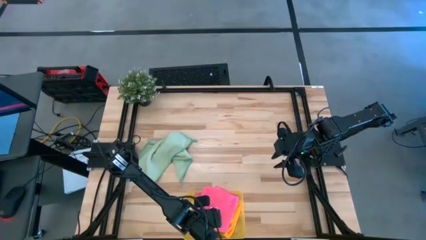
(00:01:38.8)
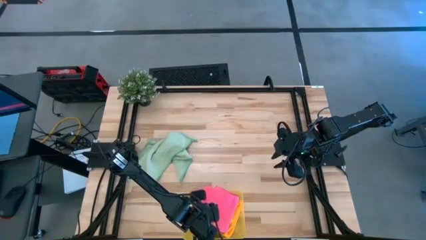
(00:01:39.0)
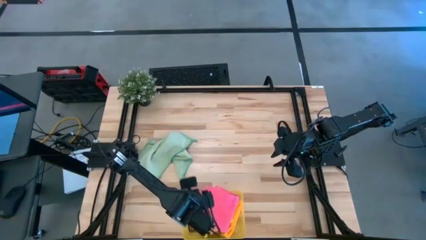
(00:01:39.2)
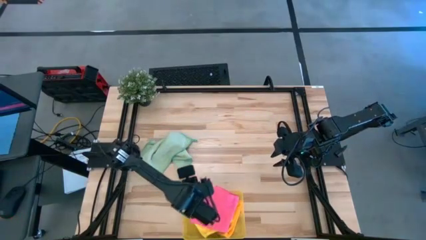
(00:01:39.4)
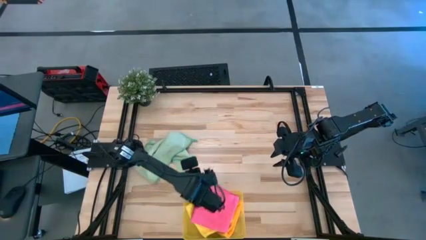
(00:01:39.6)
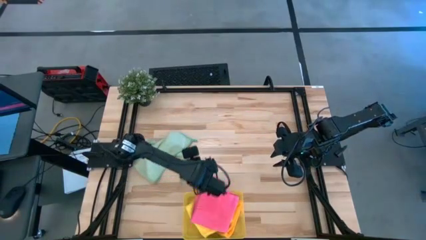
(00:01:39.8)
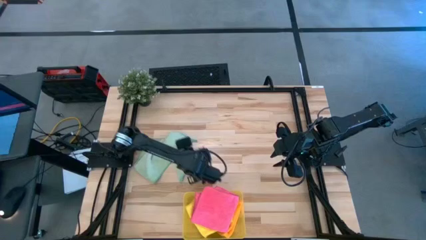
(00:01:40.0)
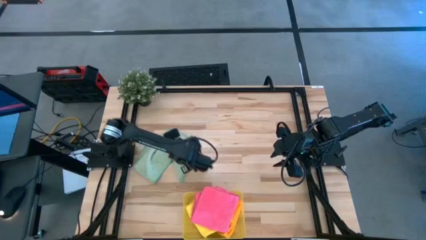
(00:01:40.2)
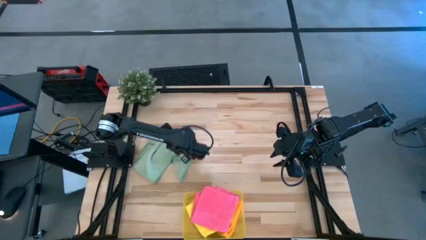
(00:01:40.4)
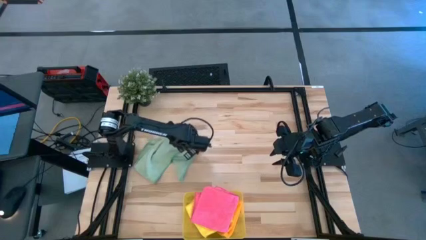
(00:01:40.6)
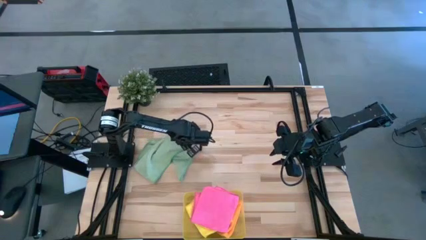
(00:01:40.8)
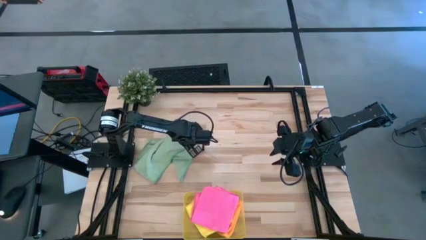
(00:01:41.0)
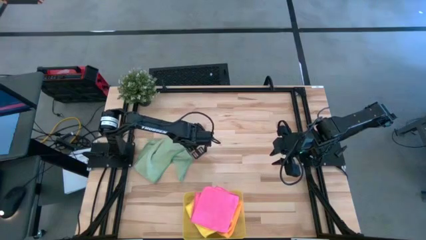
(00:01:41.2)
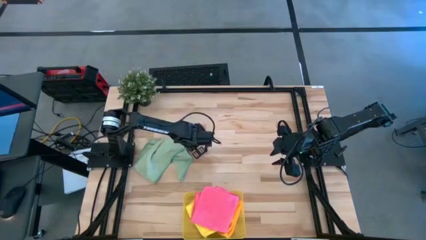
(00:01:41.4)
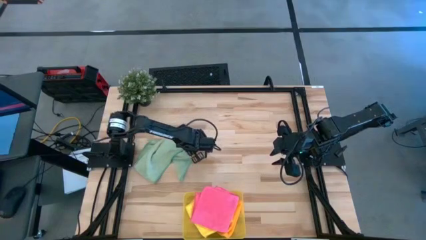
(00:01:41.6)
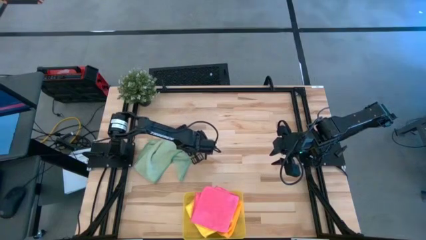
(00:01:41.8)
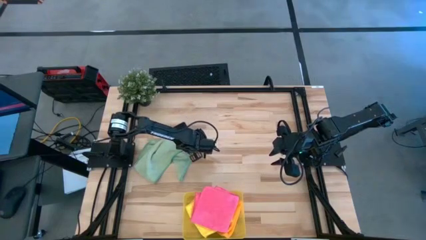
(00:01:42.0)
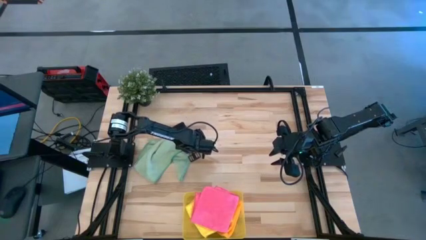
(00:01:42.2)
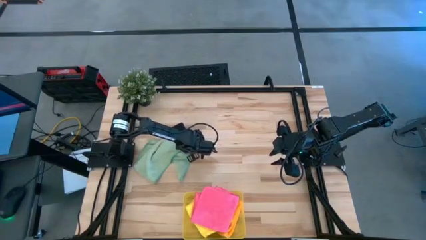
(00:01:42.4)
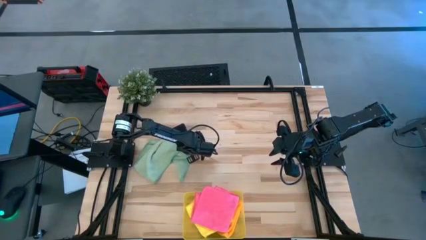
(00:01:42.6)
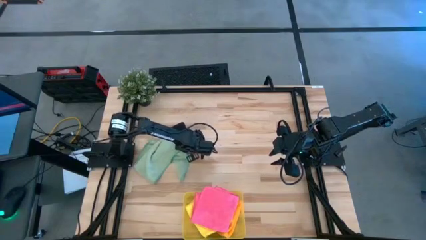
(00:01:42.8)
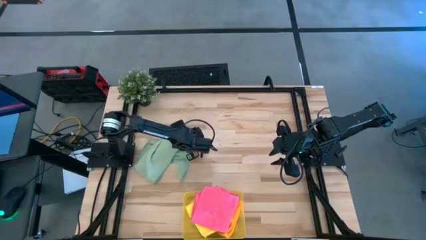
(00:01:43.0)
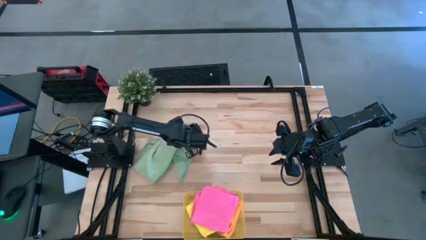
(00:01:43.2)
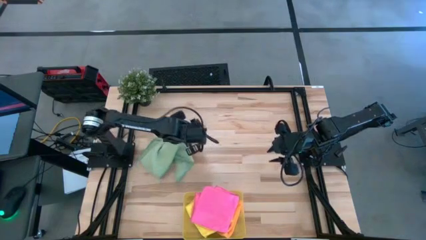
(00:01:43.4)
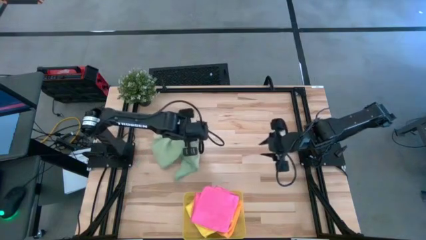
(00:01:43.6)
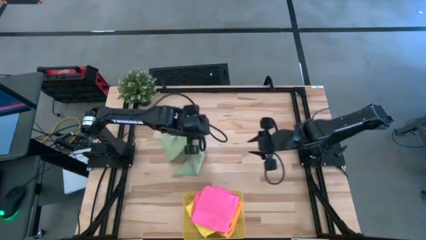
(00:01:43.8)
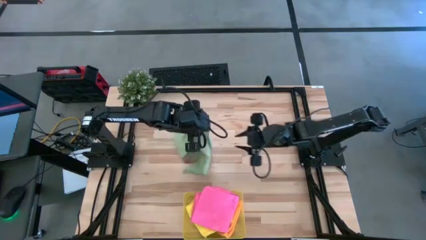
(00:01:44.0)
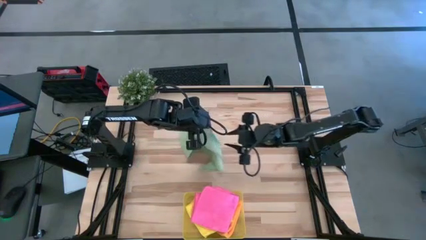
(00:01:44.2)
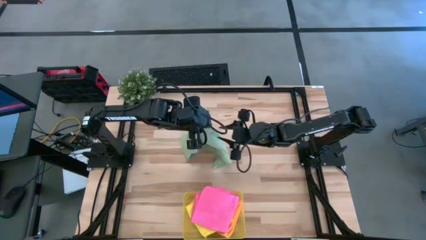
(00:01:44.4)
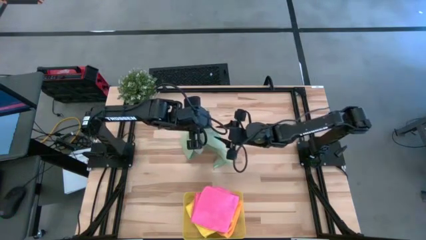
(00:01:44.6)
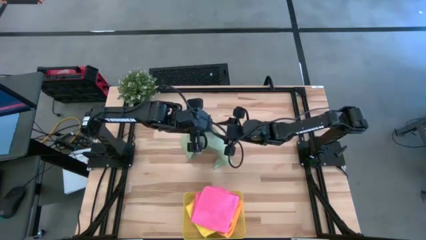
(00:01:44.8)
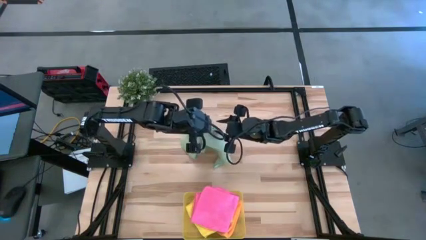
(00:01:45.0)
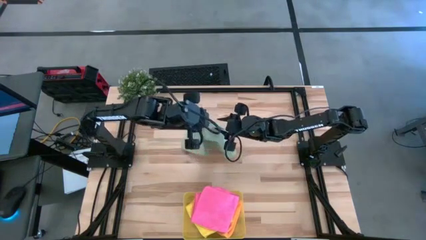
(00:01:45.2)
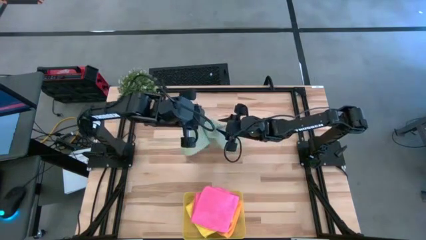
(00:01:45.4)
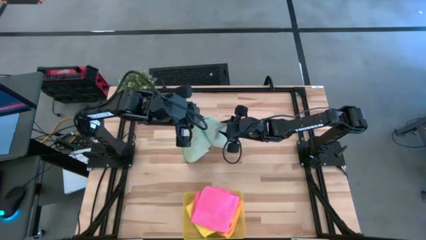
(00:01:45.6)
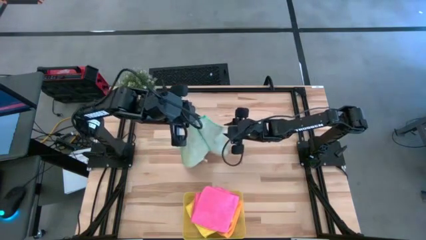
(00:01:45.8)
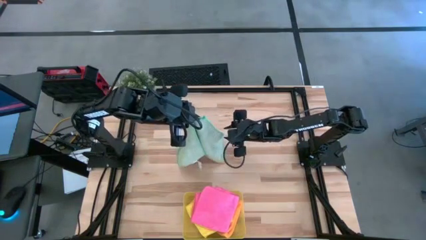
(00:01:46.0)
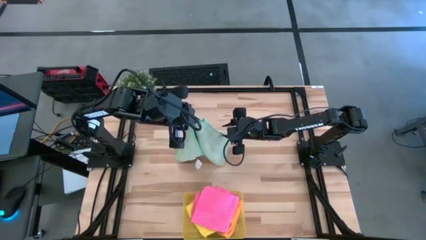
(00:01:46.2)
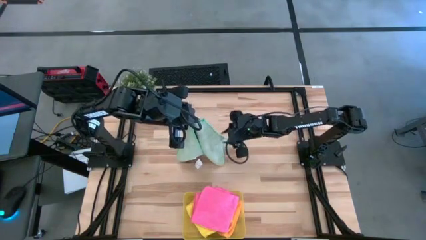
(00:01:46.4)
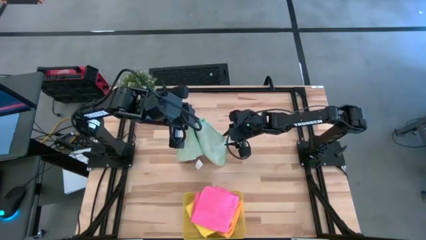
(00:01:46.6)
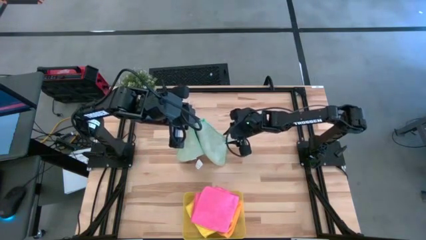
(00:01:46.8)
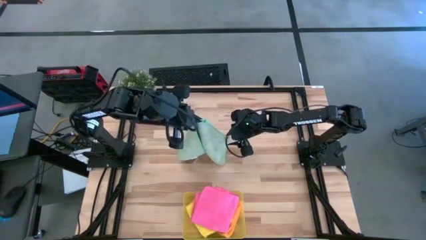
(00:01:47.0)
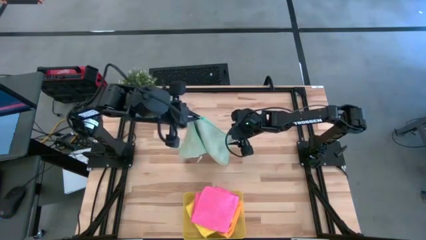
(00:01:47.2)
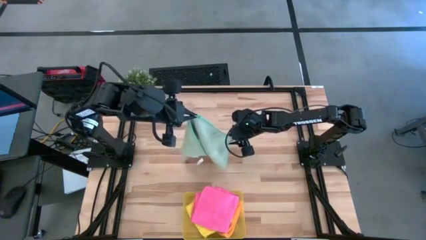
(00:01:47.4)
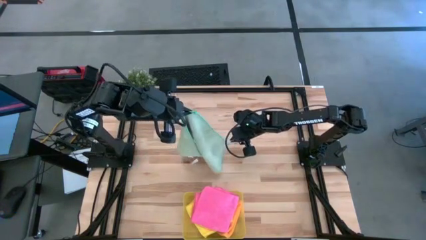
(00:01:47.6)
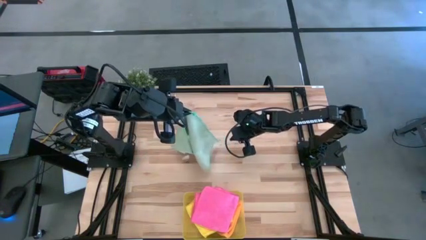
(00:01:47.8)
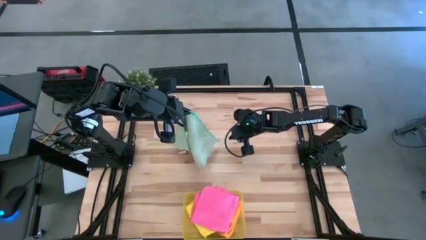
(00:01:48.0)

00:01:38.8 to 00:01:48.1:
Task: Fold microfiber towels
Fold the green microfiber cloth

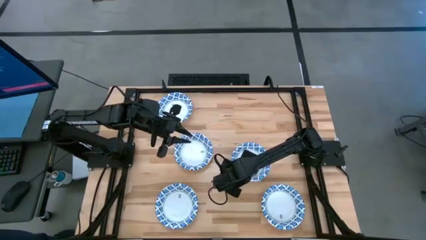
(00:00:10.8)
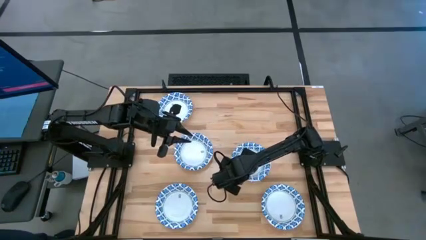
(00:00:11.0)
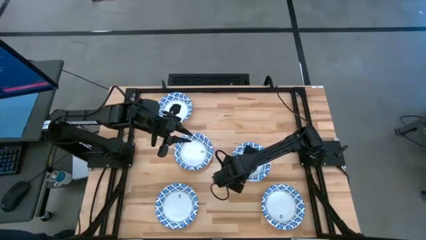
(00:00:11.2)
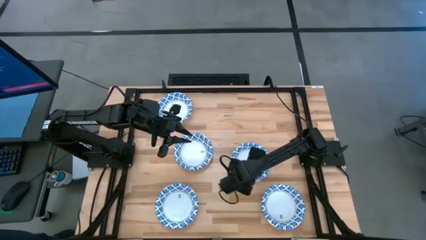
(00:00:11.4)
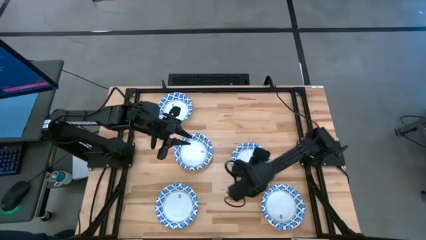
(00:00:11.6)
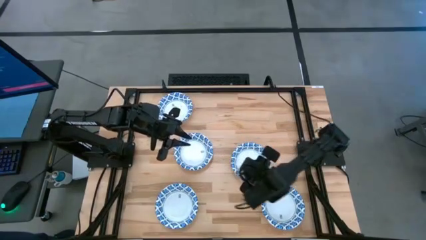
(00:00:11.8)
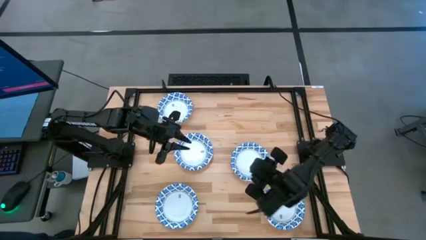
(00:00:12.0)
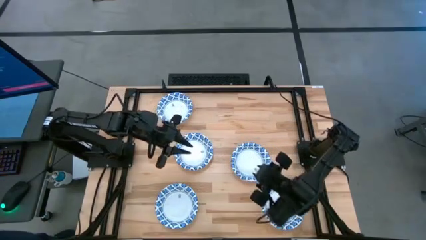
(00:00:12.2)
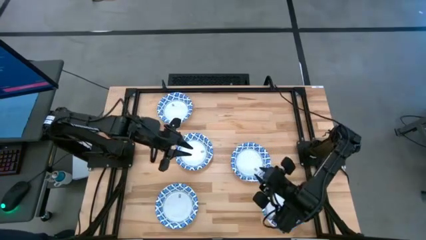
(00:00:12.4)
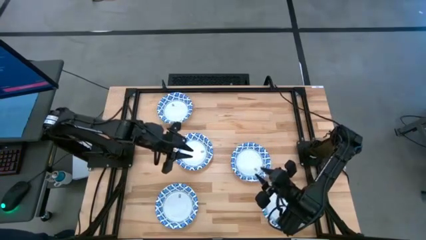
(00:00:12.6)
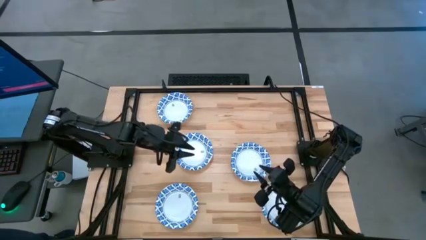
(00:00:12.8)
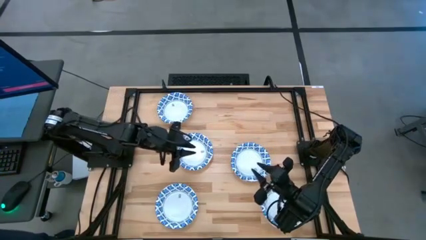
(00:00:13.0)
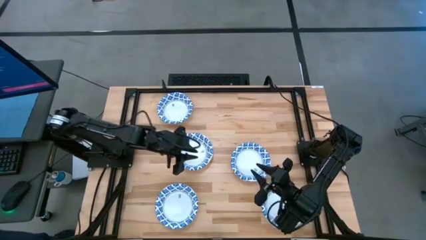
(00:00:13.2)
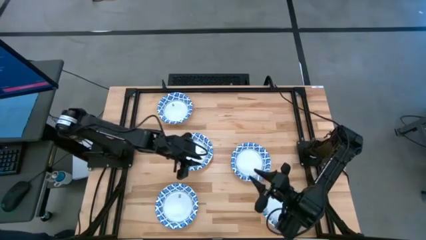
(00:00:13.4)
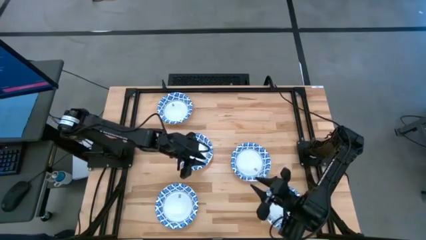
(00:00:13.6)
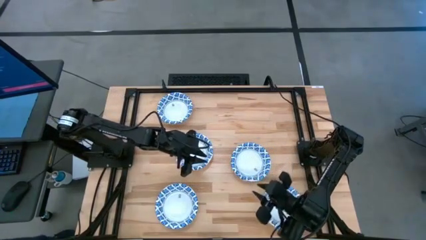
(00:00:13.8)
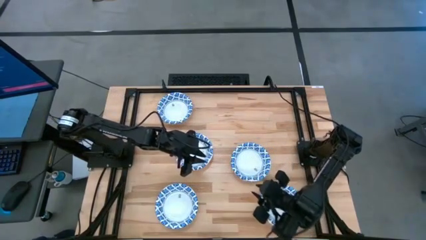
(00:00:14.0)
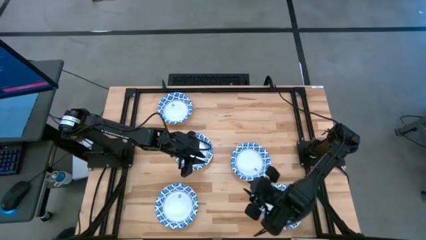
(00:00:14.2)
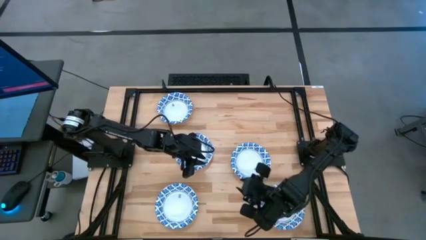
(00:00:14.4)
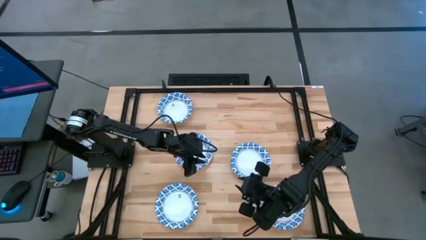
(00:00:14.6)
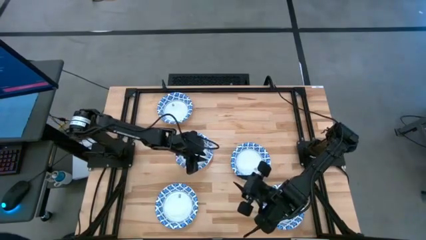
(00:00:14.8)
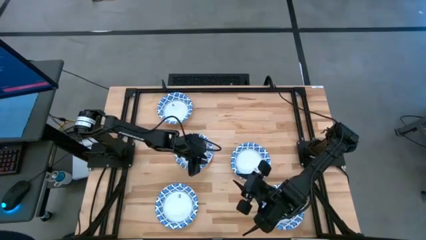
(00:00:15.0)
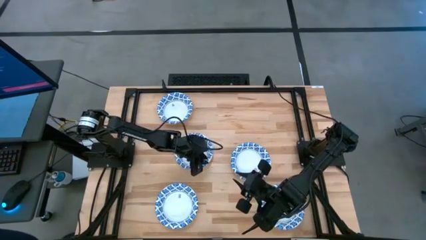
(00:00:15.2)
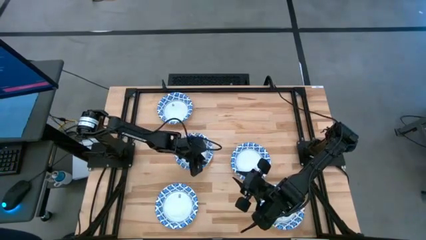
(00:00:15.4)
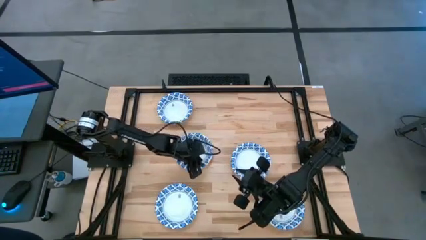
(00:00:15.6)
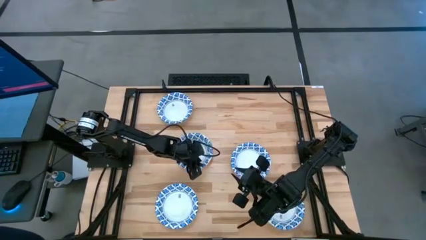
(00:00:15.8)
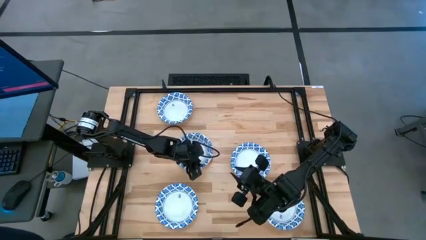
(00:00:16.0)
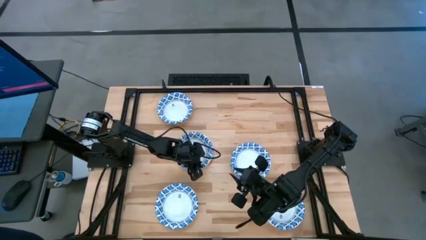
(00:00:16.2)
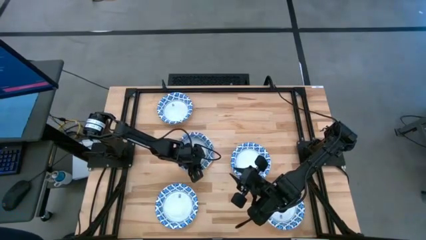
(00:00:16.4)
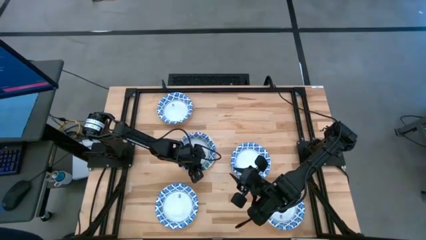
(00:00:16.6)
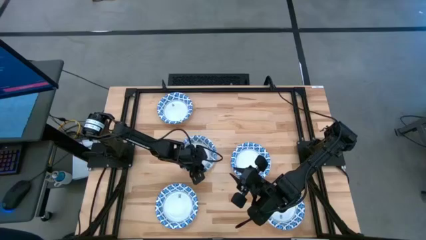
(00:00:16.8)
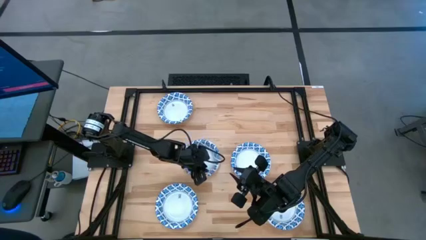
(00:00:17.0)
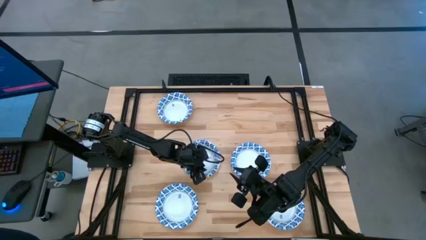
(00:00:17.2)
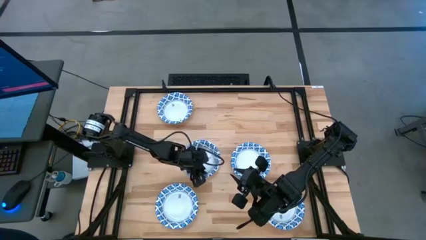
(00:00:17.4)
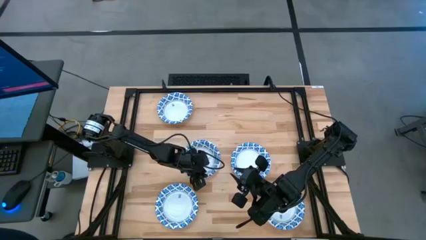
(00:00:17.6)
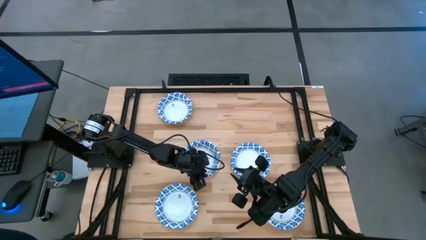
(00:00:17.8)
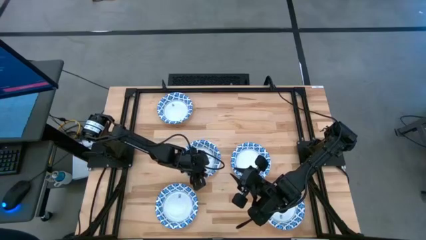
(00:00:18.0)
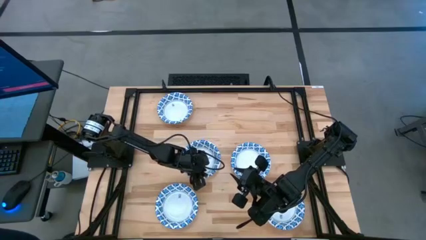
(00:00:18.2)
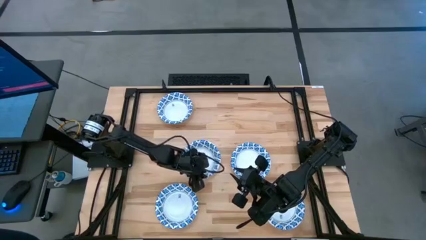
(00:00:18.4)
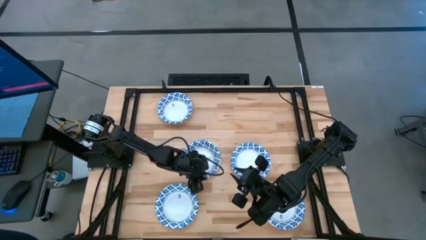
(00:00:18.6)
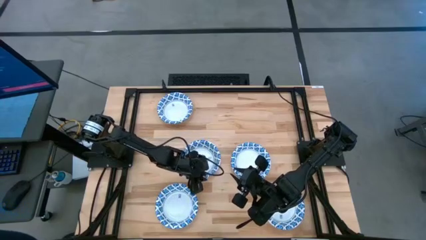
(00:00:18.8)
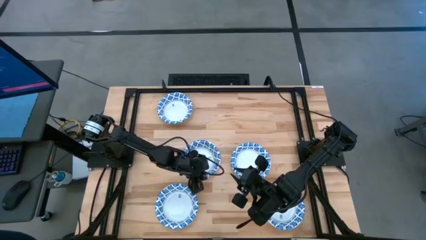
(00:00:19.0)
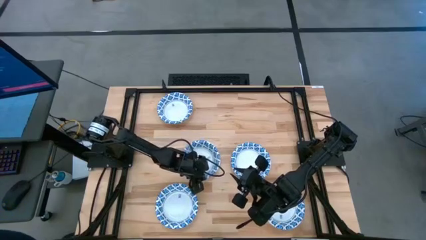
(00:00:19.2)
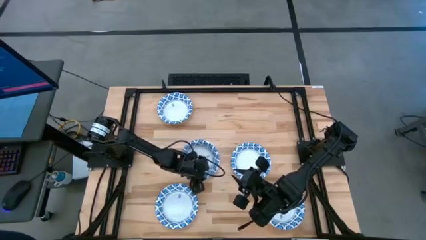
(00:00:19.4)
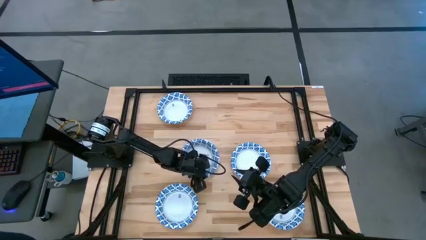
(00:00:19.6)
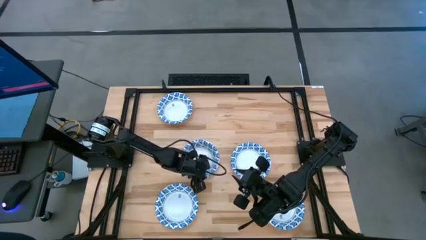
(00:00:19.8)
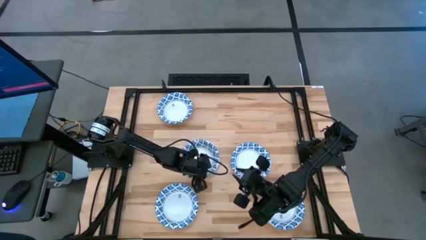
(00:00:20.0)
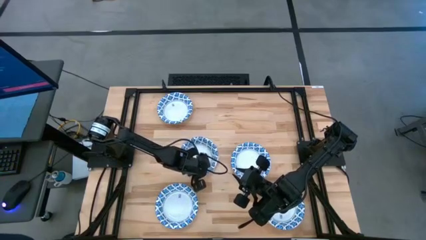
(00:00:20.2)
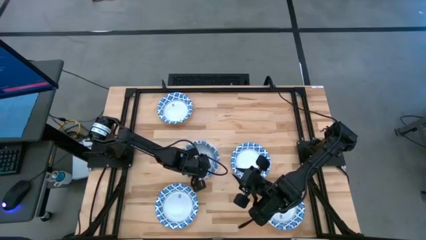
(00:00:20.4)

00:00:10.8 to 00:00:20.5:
Task: Nest bowls inside each other
Stack the white bowl on top of the other white bowl
